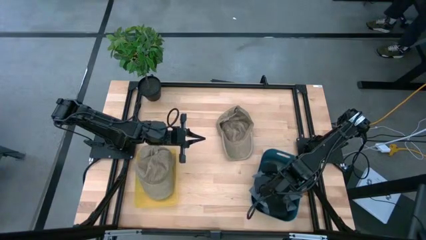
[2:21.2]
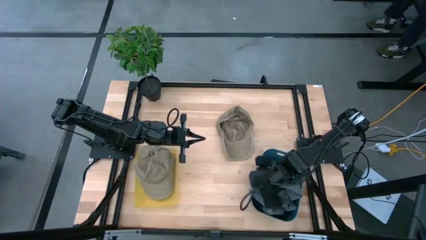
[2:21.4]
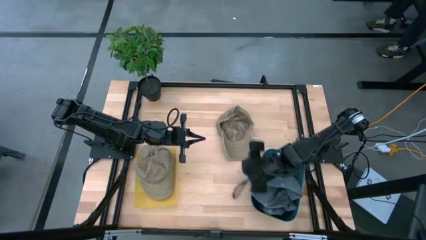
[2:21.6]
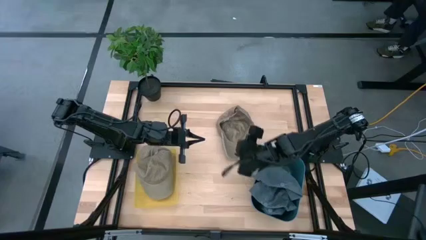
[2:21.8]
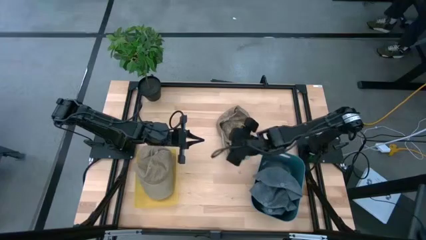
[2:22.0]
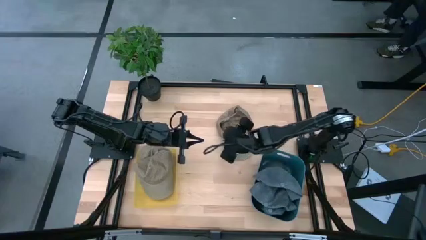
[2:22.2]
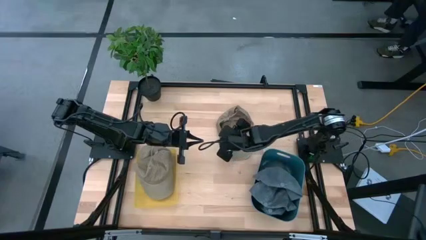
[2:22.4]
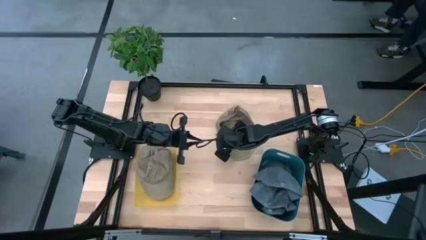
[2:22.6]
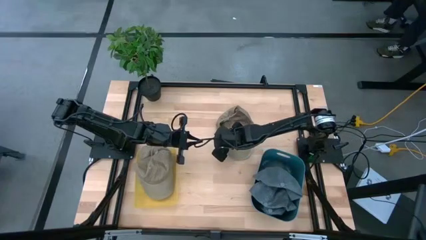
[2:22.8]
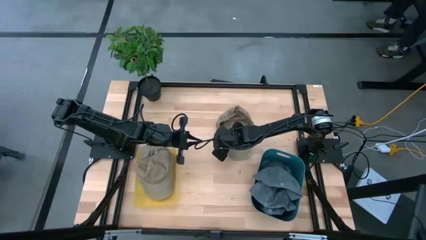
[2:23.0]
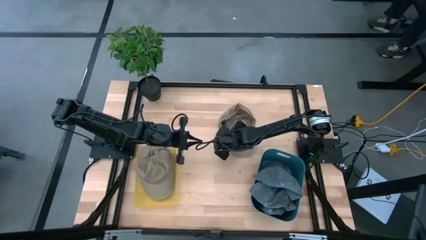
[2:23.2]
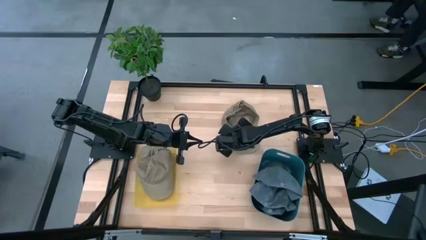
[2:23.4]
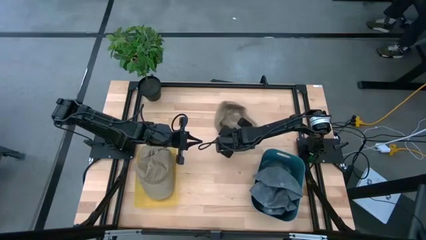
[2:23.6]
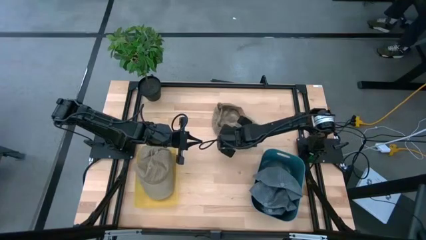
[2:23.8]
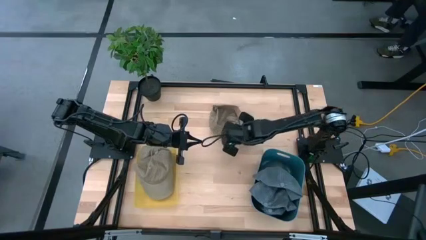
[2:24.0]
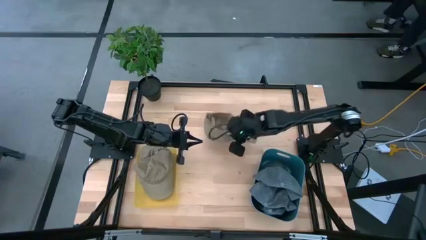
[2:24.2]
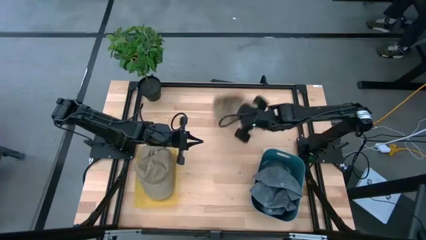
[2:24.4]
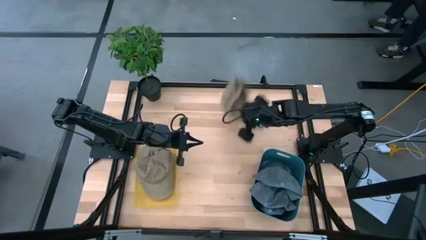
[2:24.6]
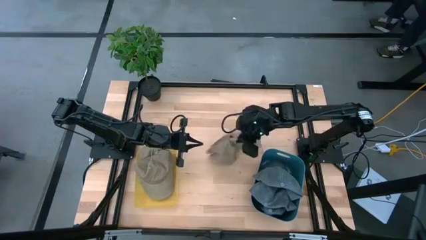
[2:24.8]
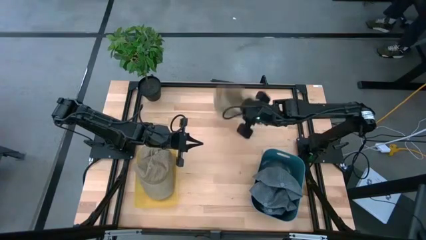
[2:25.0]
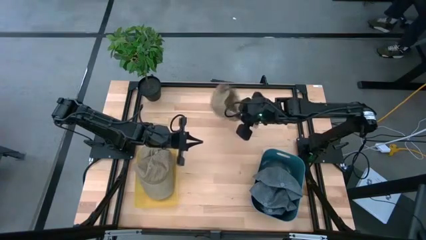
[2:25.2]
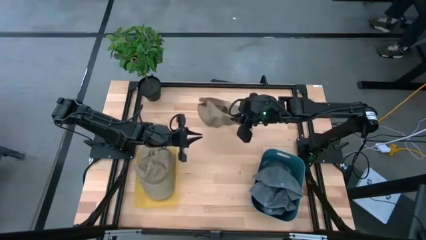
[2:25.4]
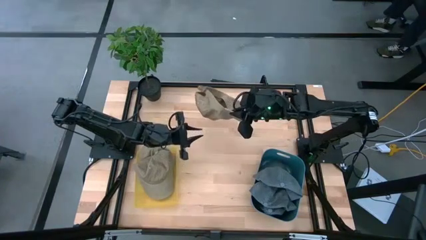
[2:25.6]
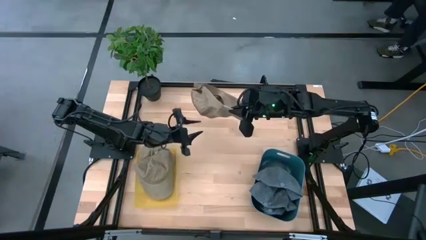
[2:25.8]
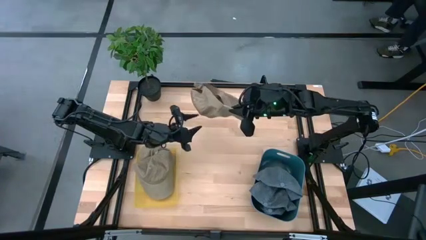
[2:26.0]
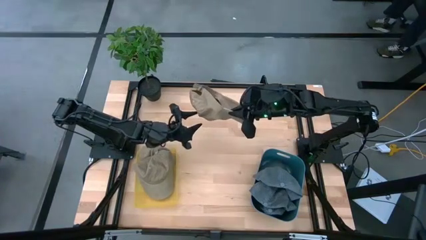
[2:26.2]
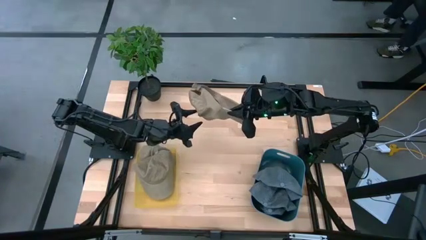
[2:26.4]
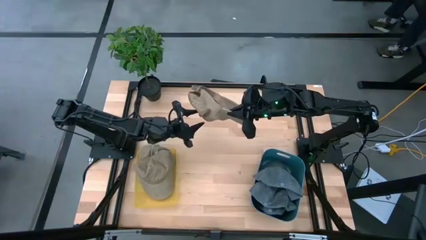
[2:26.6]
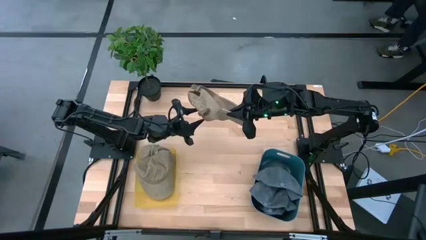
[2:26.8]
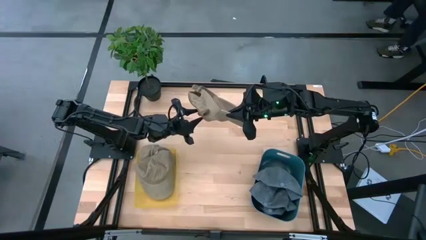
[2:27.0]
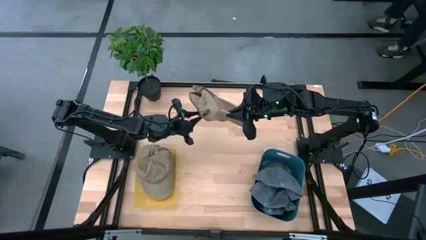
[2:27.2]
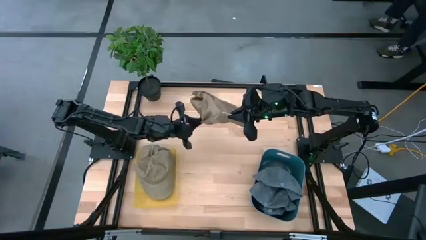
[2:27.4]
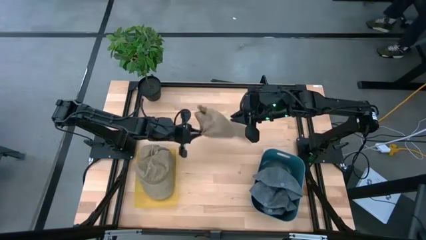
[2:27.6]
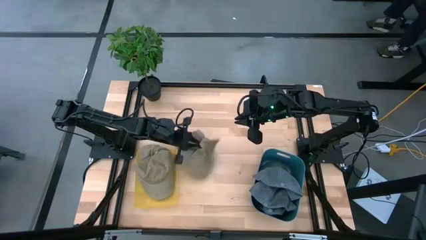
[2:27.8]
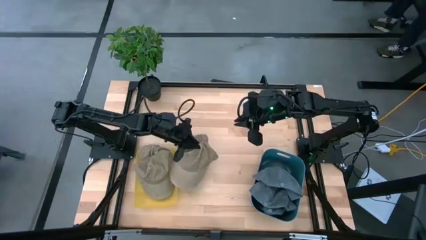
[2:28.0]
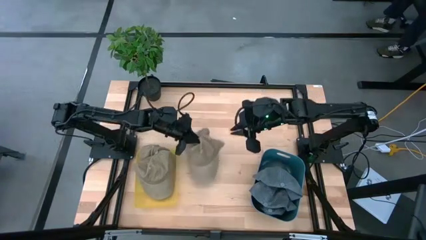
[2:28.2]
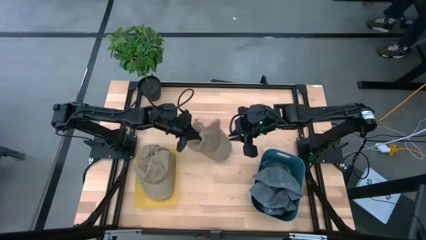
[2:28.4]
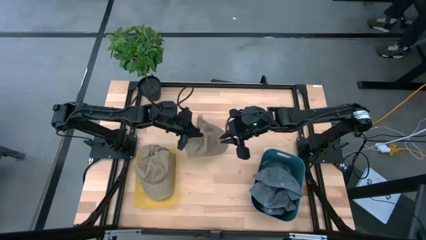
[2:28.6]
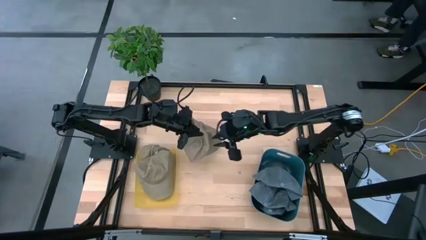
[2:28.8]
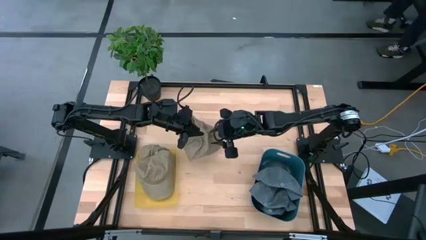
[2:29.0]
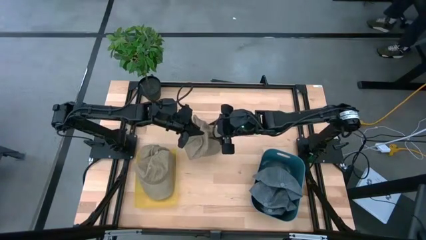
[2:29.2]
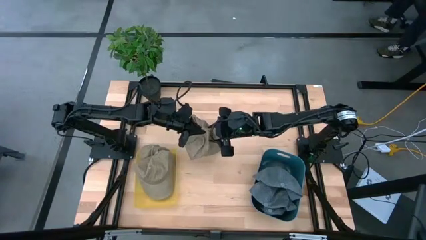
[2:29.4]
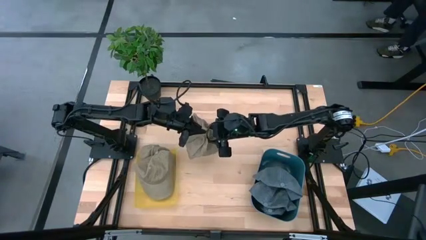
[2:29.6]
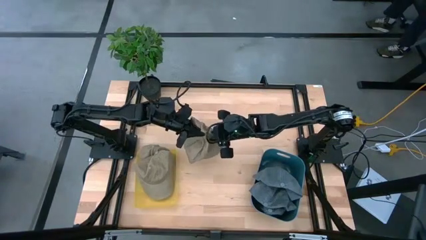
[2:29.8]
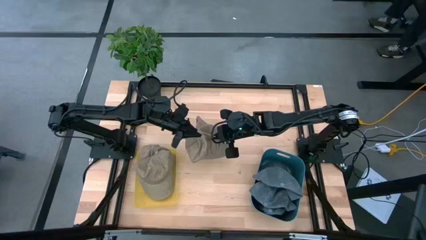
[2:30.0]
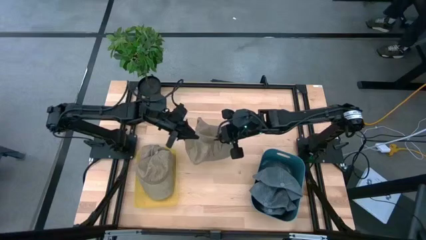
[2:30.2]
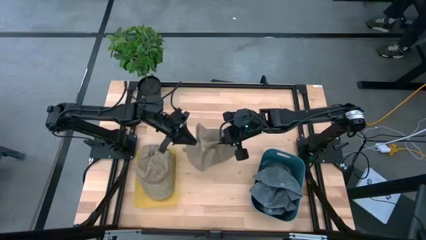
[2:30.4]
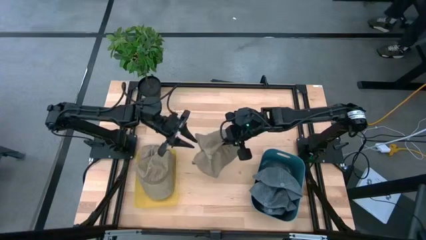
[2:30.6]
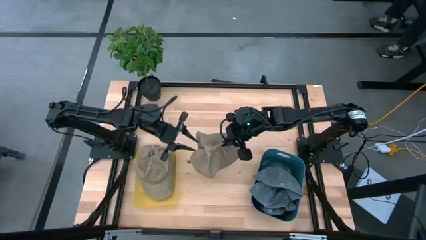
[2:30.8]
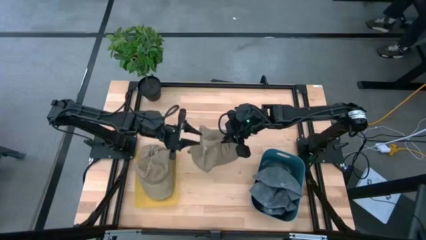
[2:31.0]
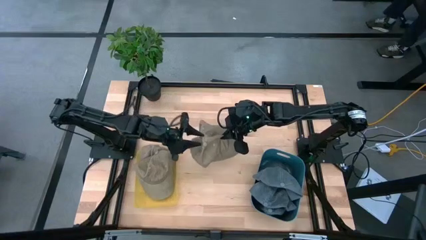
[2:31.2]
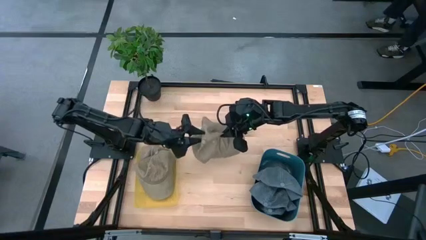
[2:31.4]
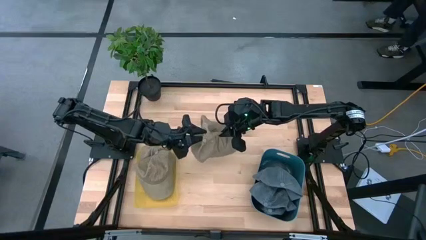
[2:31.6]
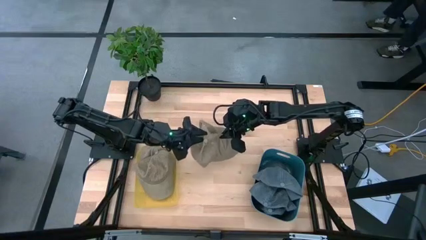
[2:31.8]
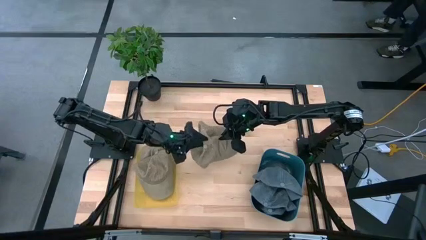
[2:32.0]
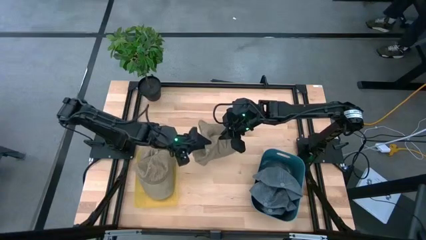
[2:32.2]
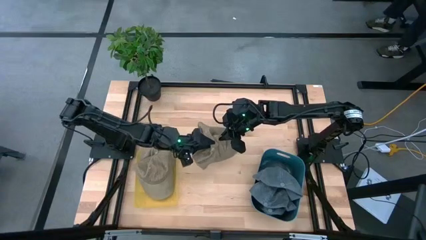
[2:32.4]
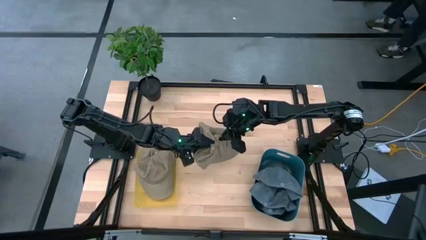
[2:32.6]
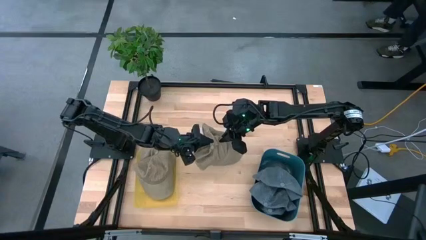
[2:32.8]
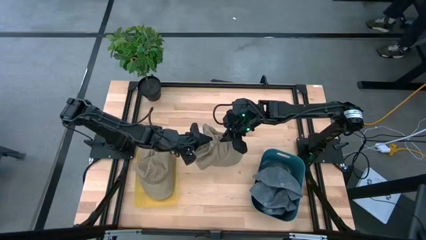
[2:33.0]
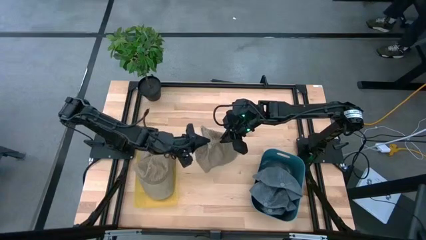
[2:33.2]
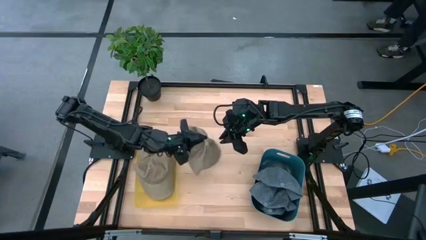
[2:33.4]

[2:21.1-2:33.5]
Task: Pick & Place hat
Put the brown cap into the yellow bin
